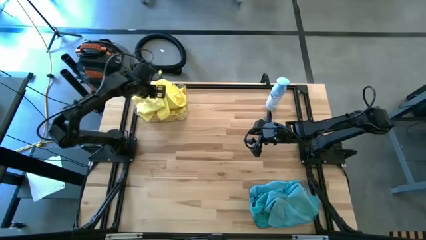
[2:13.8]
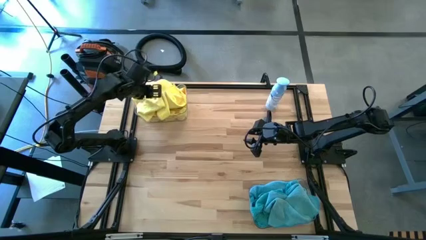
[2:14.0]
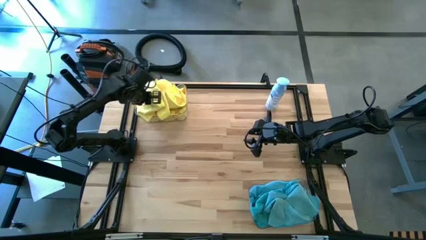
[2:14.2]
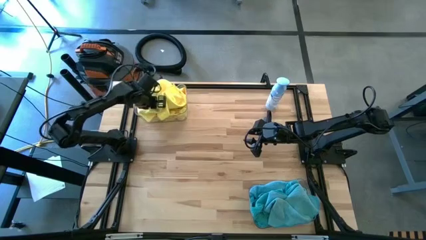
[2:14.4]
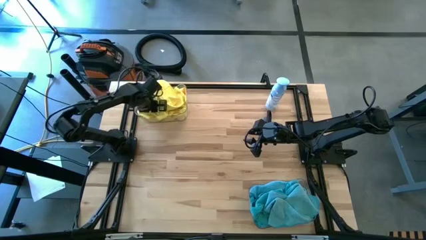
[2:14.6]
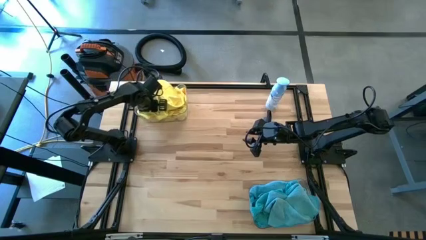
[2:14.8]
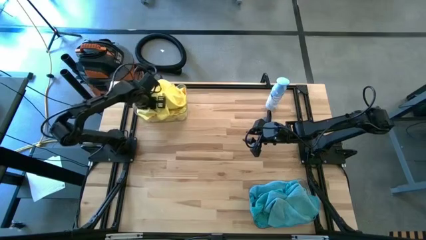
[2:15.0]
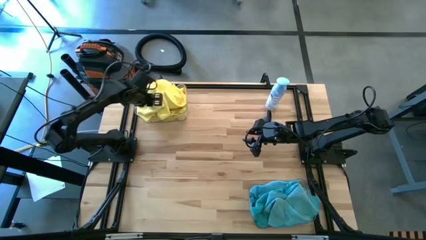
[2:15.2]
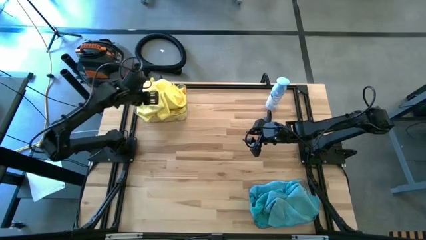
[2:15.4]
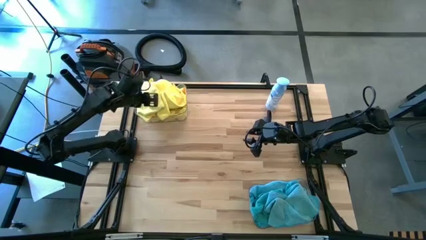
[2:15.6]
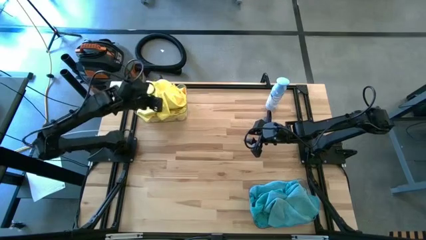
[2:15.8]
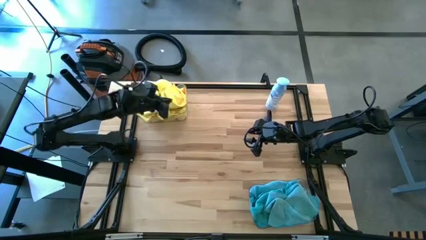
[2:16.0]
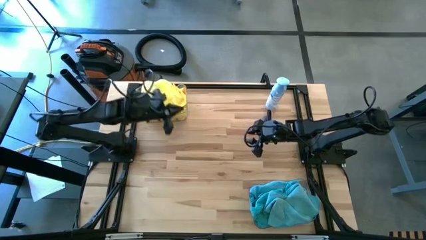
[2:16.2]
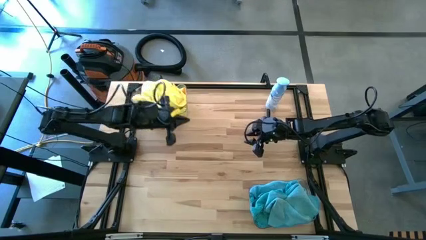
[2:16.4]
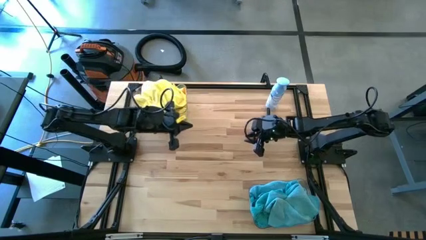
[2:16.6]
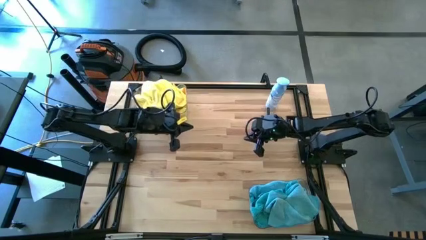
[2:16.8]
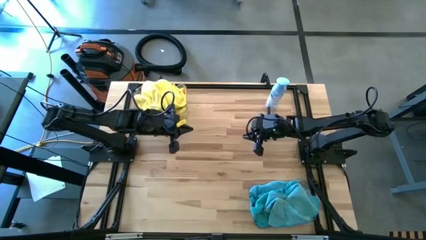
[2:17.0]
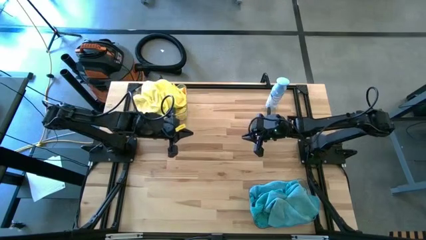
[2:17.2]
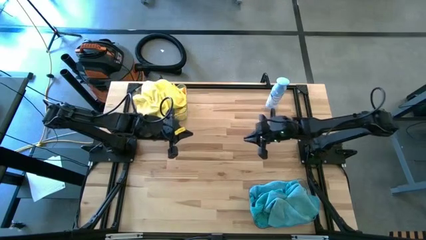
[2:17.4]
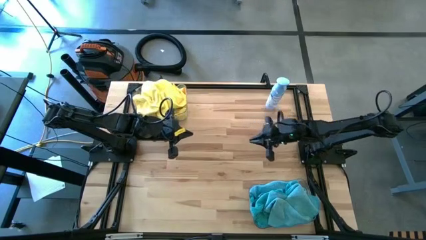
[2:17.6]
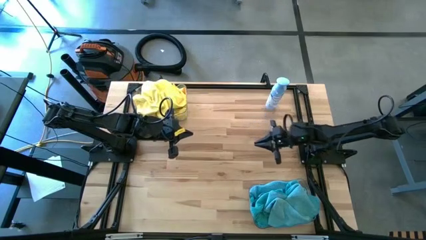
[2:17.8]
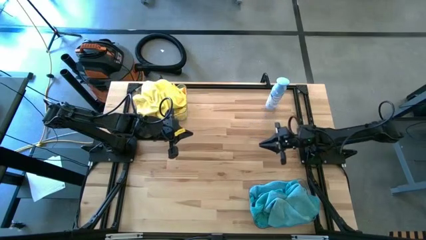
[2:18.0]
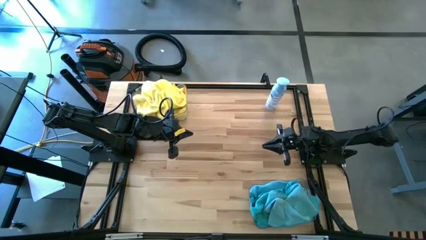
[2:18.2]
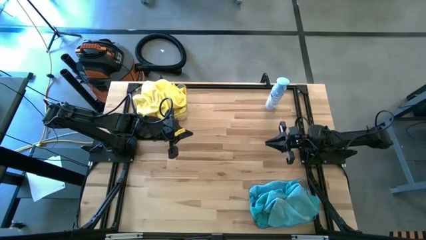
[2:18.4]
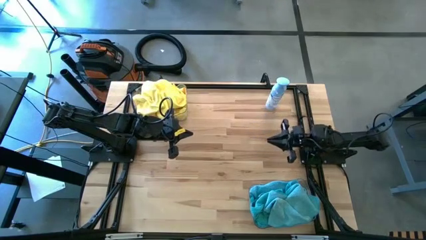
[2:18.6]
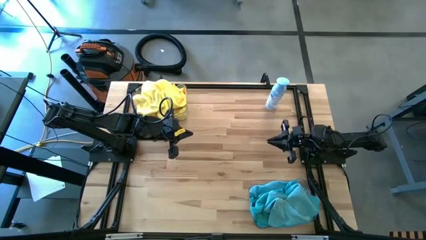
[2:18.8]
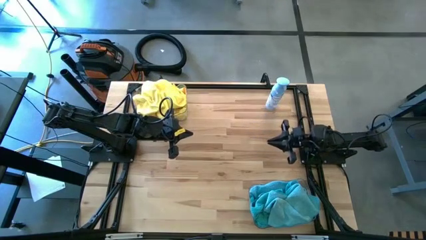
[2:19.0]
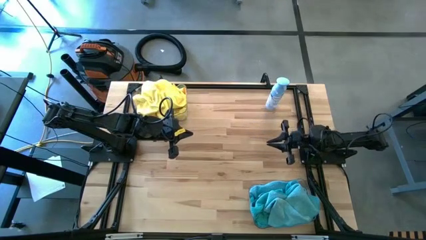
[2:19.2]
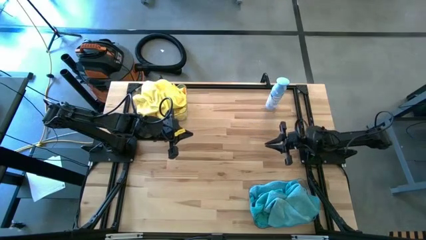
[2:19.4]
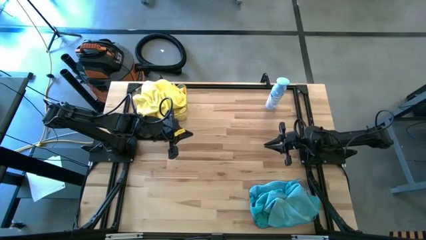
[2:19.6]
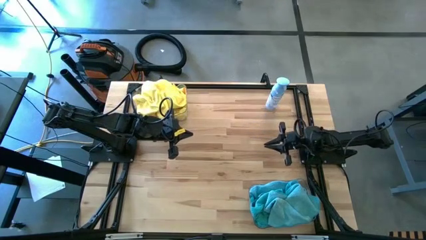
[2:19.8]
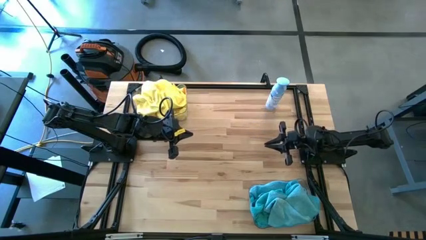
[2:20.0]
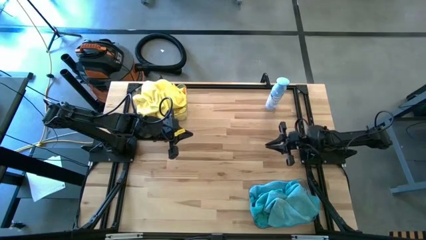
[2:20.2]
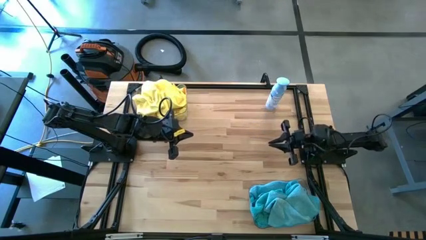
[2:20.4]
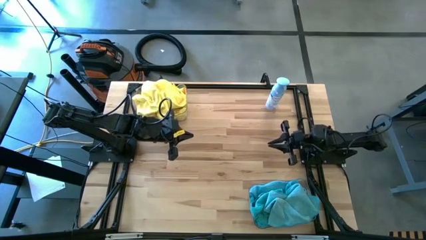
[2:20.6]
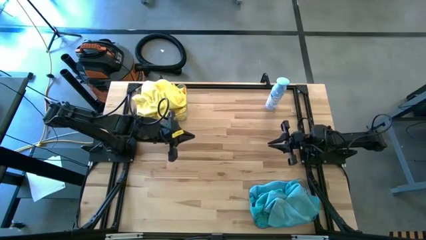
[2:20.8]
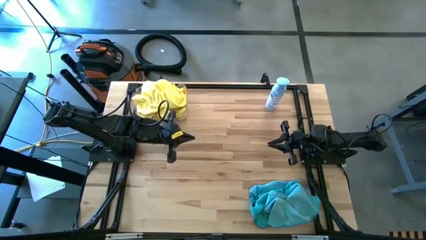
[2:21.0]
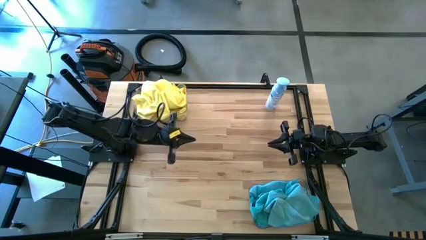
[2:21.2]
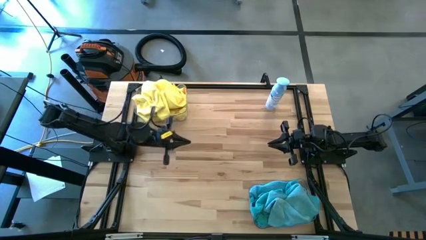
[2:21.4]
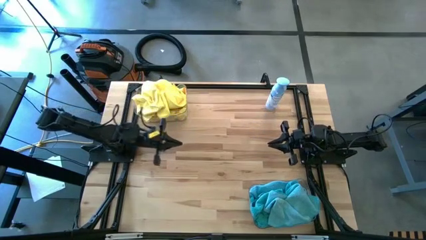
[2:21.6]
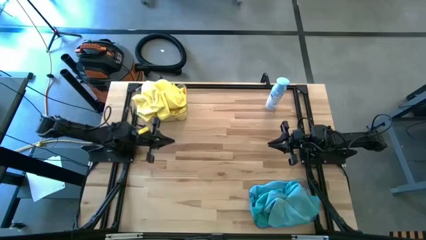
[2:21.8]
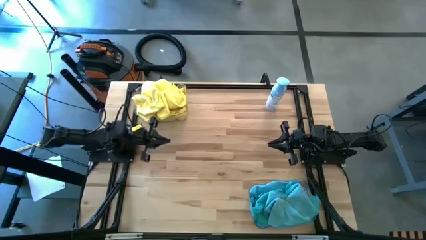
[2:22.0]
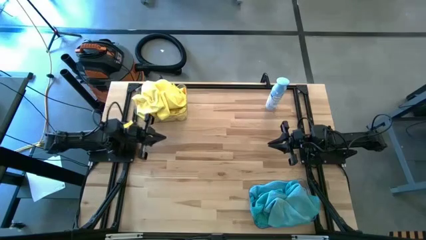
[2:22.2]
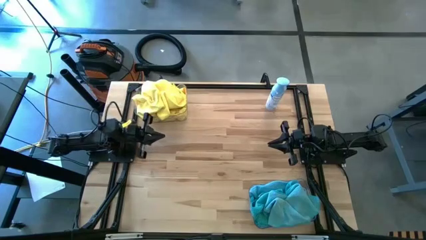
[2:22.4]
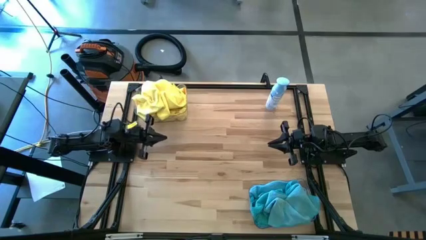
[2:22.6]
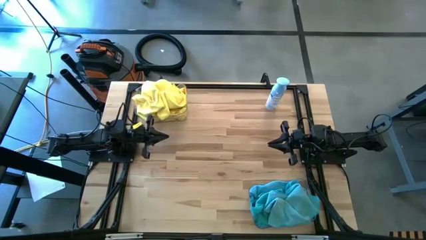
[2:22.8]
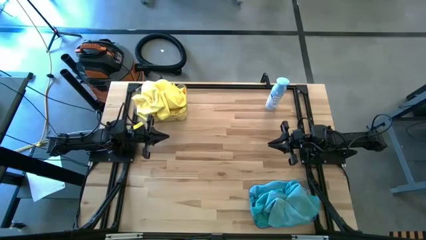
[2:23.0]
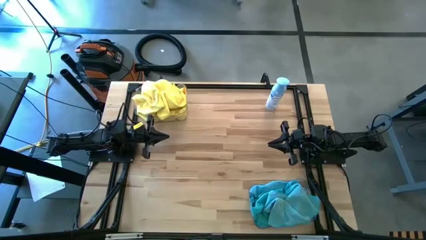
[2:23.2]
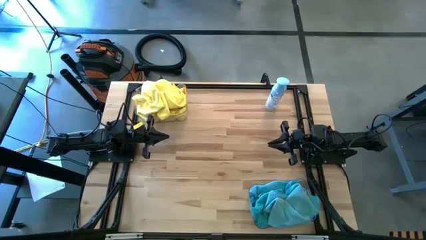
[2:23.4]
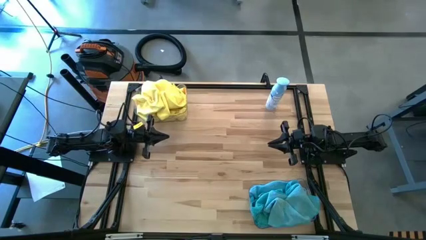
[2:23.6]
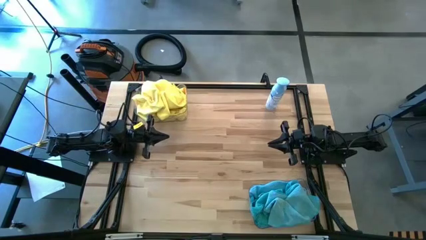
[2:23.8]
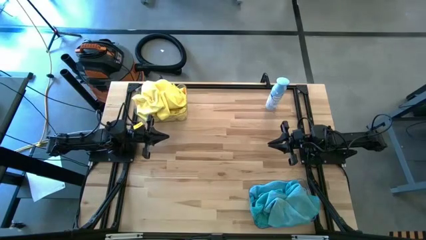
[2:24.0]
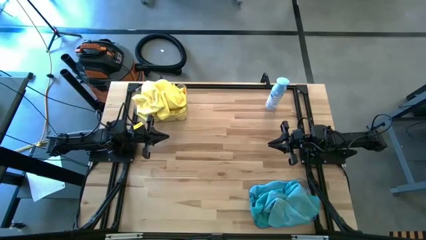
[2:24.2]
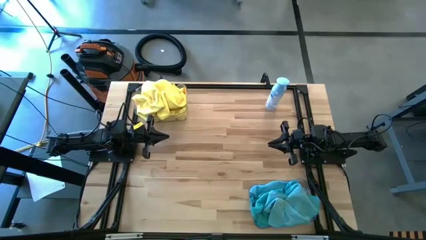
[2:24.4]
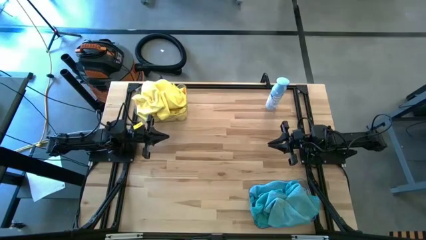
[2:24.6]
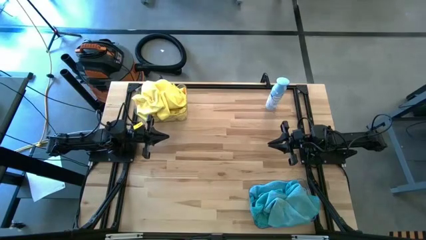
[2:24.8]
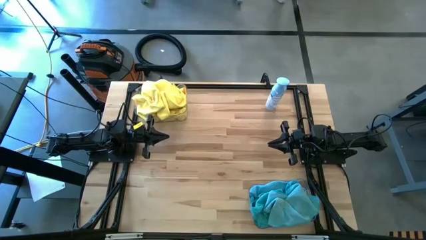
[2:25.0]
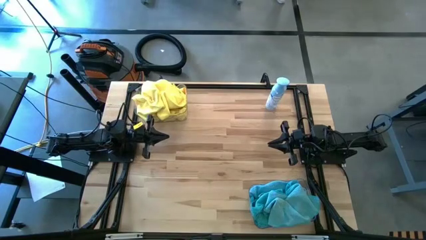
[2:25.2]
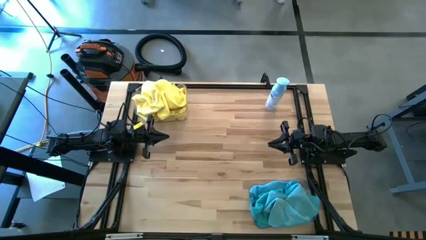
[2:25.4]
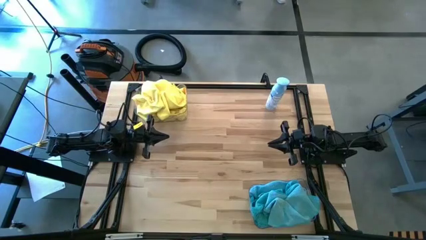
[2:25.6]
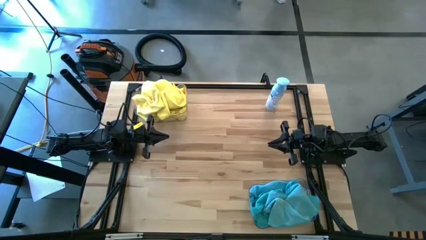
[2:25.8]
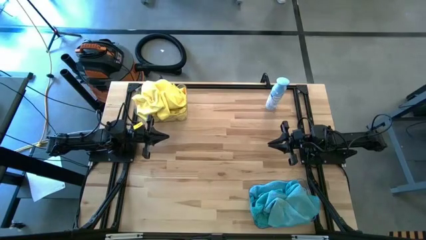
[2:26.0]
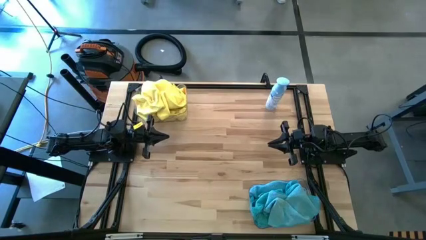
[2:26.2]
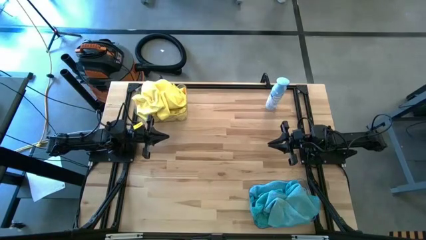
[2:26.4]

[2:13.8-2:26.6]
Task: Sort microfiber towel by color & place in baskets
Return to Home Position

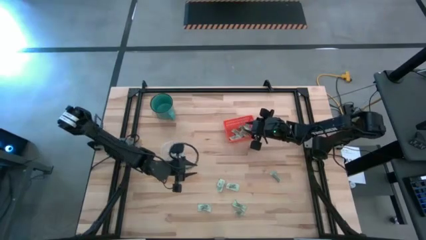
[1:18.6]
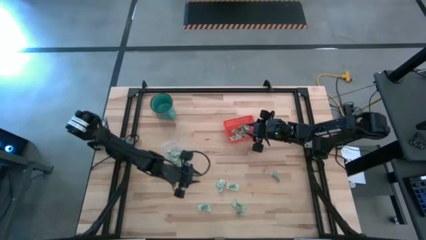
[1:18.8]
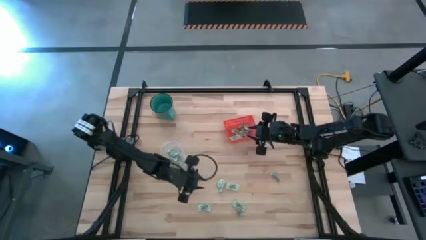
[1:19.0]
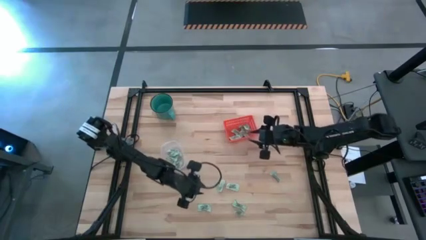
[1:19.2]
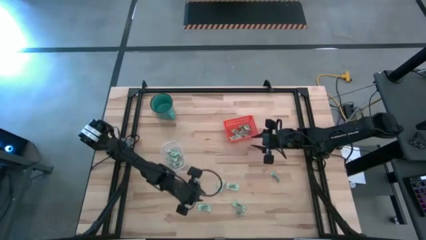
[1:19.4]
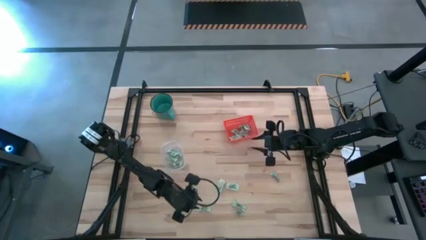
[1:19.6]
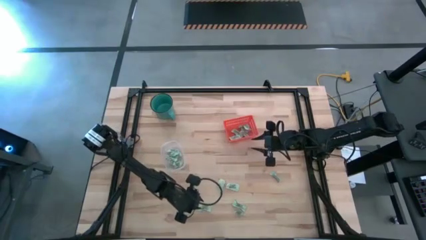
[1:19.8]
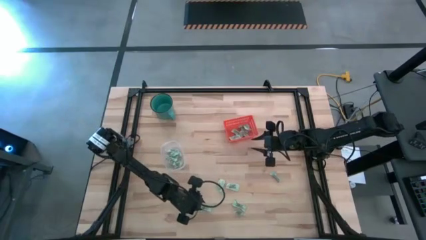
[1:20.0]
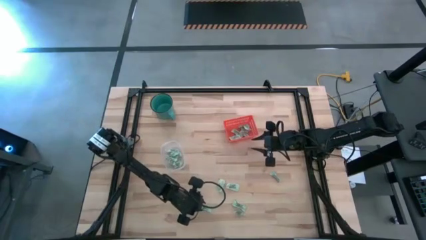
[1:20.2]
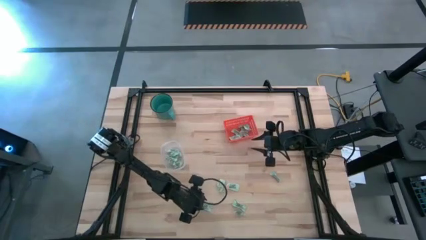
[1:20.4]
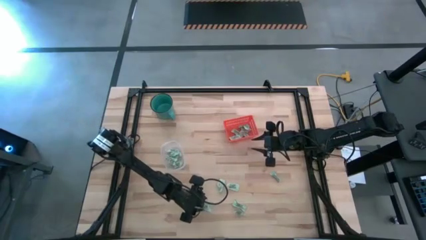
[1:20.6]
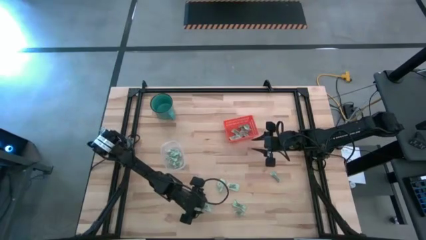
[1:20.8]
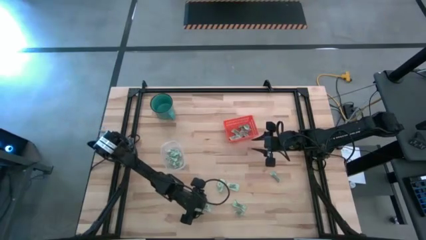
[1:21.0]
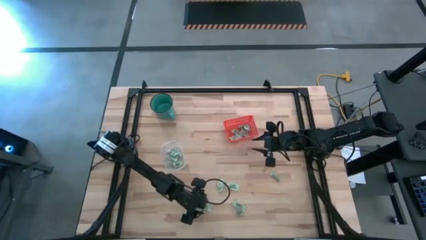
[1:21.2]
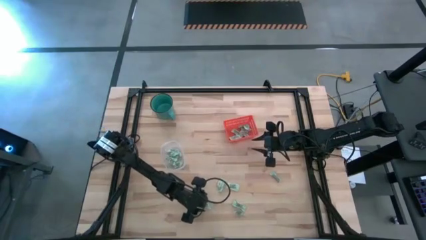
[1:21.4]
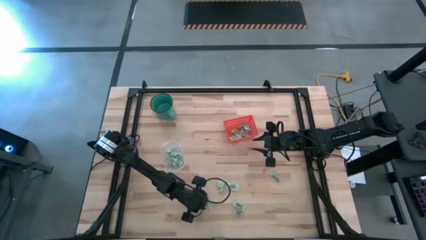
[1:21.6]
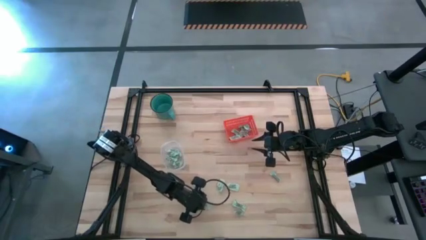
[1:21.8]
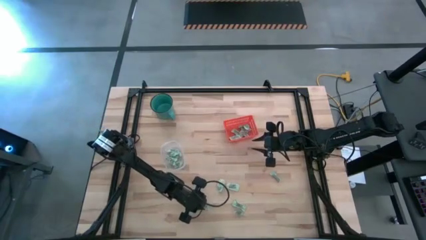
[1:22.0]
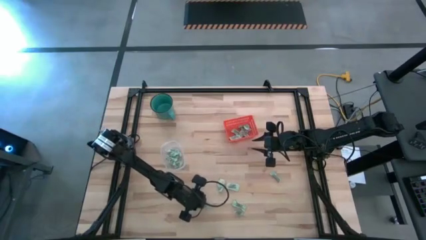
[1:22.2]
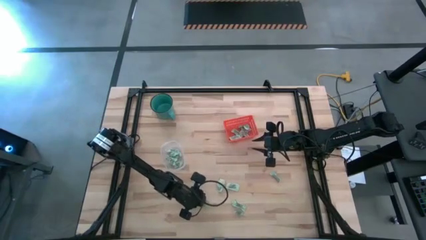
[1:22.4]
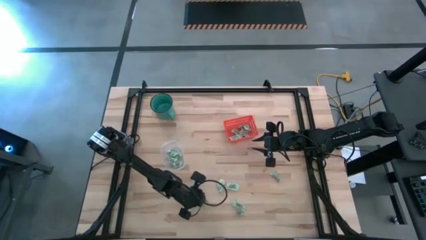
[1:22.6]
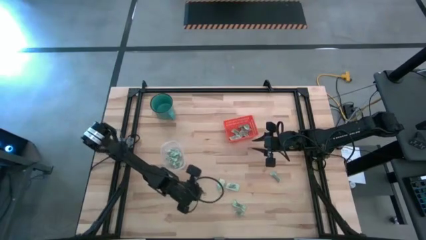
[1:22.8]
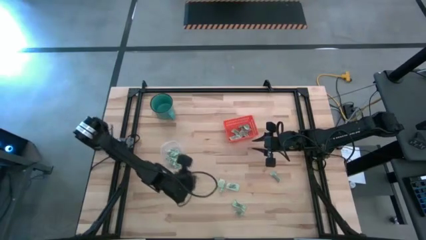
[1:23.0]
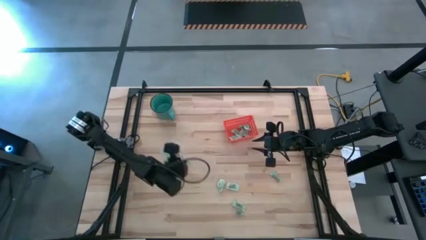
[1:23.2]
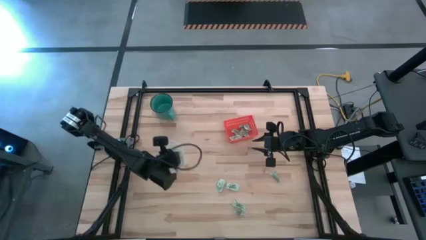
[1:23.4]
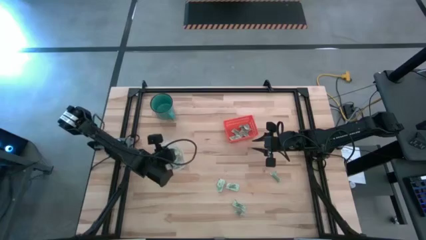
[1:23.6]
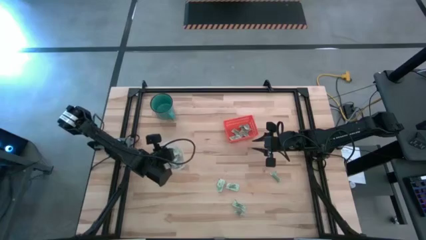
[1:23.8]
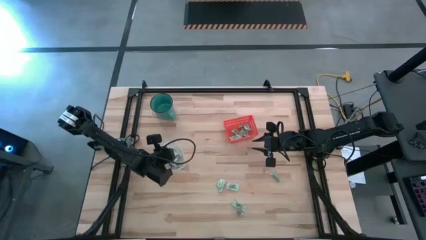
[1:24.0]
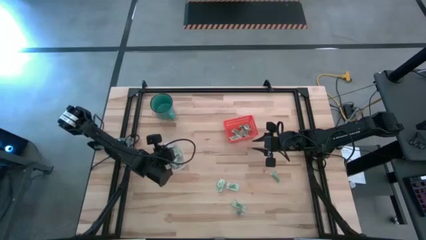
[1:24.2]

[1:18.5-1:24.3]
Task: Pick and place items into bin
Put the light green stevia packet into the transparent container
